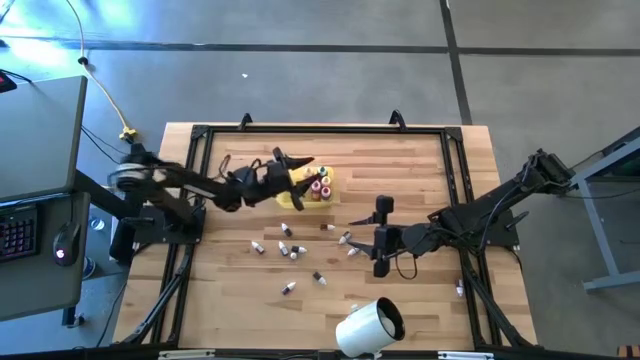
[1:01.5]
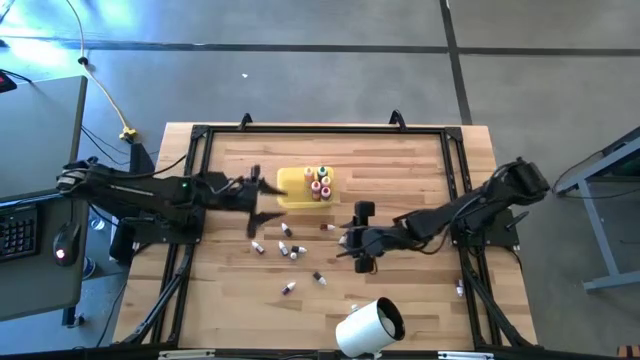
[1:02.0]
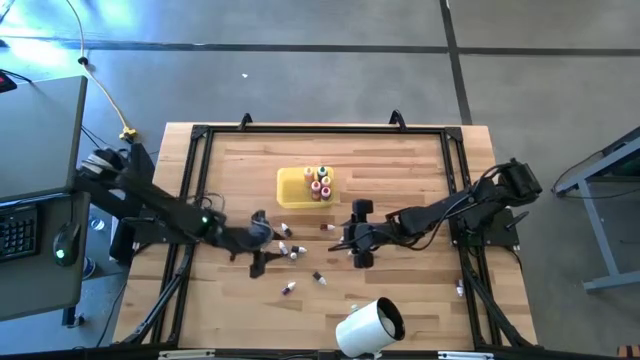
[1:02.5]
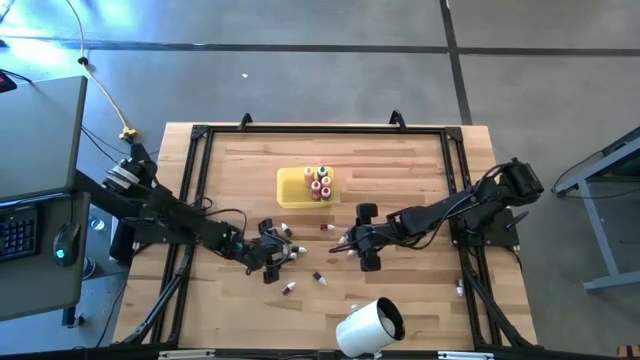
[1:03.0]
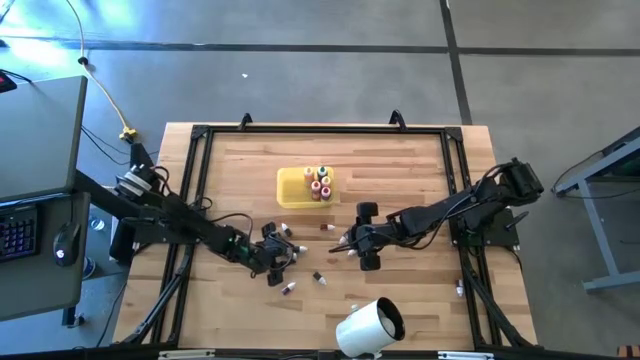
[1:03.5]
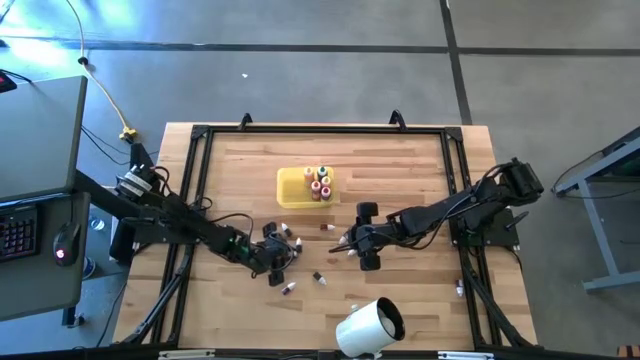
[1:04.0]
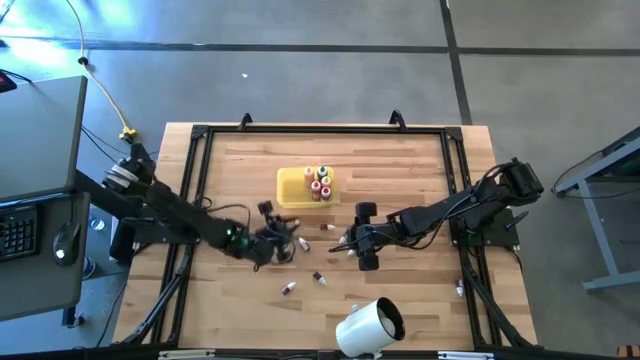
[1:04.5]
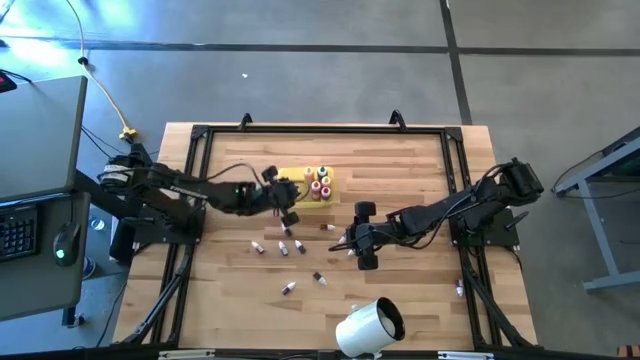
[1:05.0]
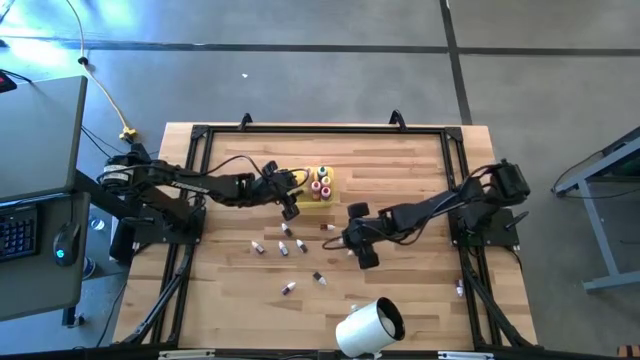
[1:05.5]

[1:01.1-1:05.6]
Task: Pick & Place food coloring
Put the left small black food coloring bottle into the yellow container

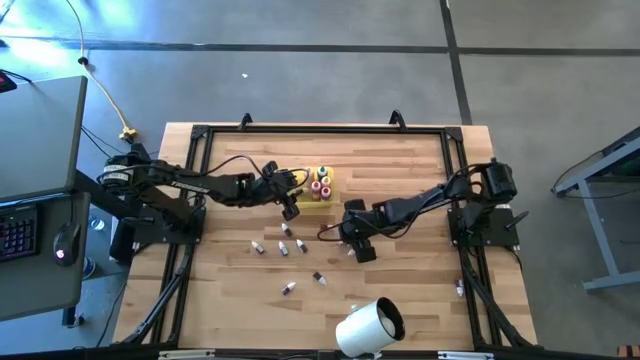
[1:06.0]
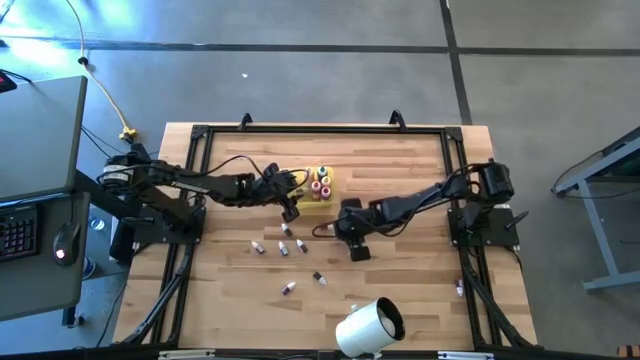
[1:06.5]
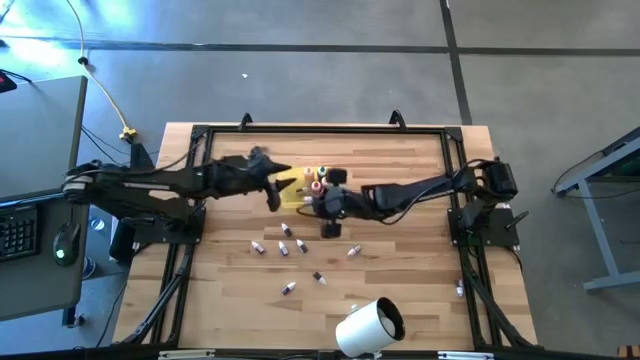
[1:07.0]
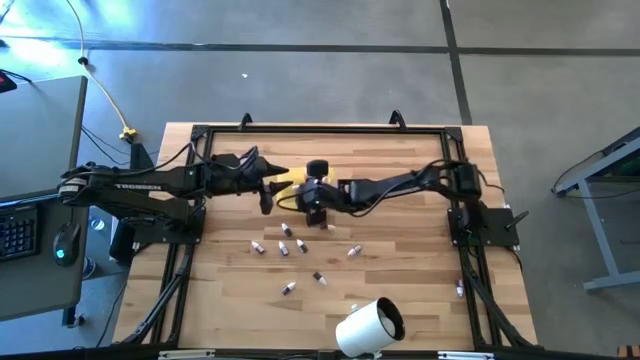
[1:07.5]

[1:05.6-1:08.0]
Put the small black food coloring bottle into the yellow container

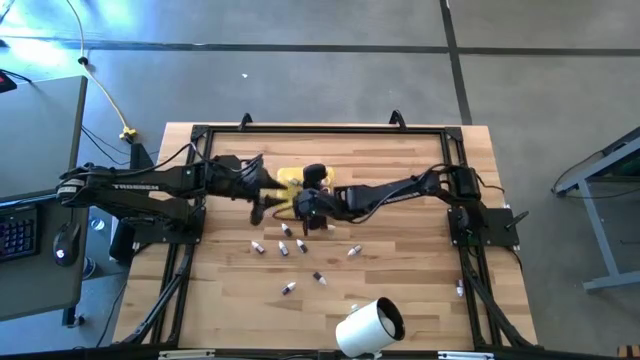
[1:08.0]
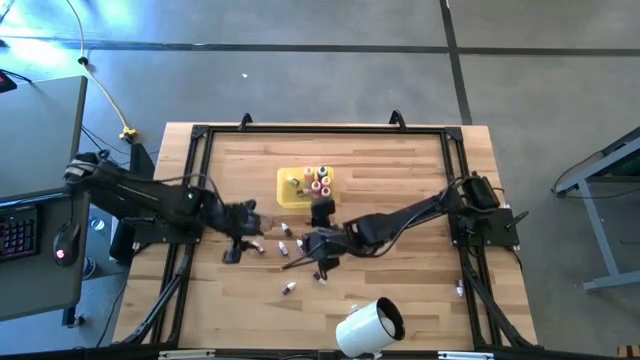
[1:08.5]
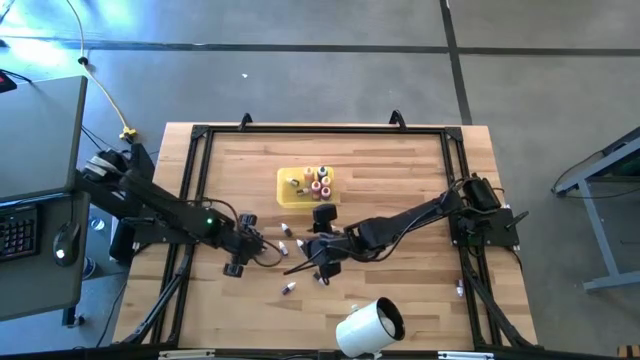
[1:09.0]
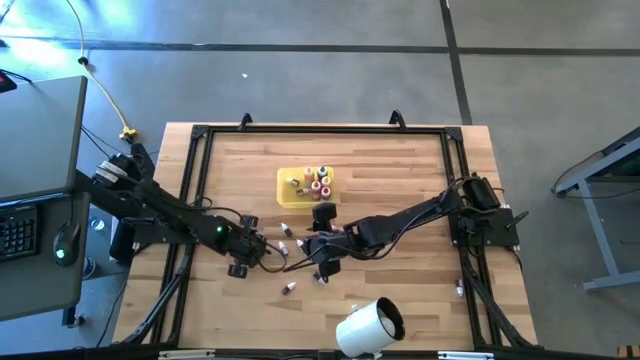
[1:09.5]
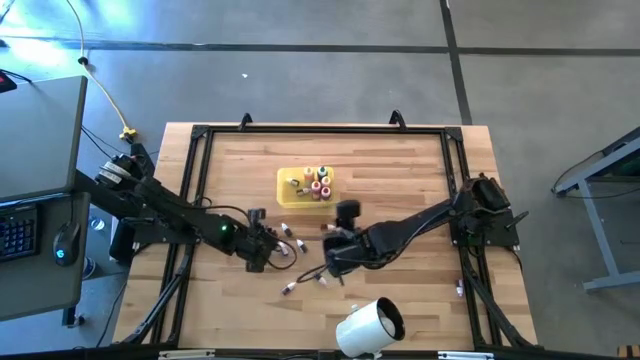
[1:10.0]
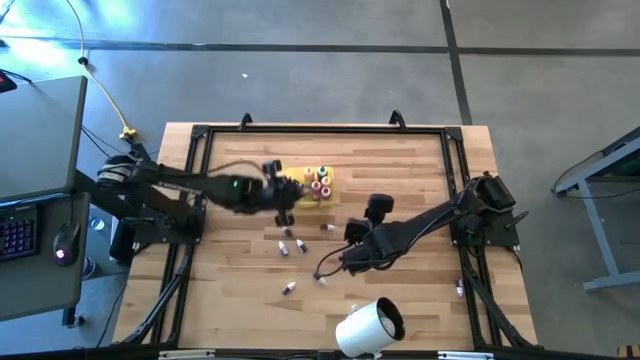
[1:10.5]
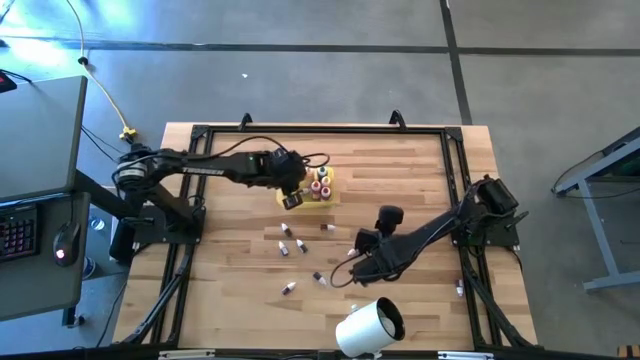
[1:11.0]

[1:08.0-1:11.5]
Put the middle small red food coloring bottle into the yellow container

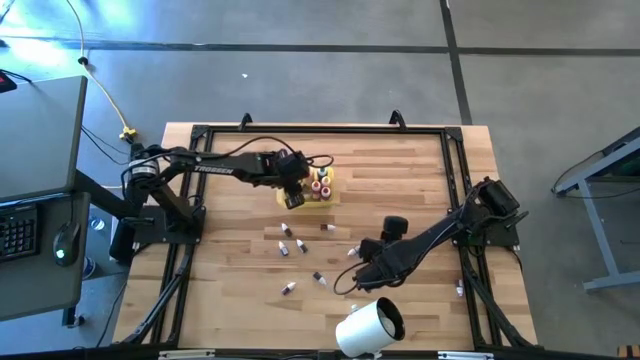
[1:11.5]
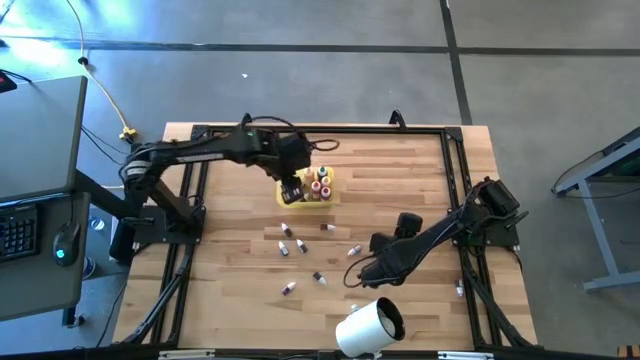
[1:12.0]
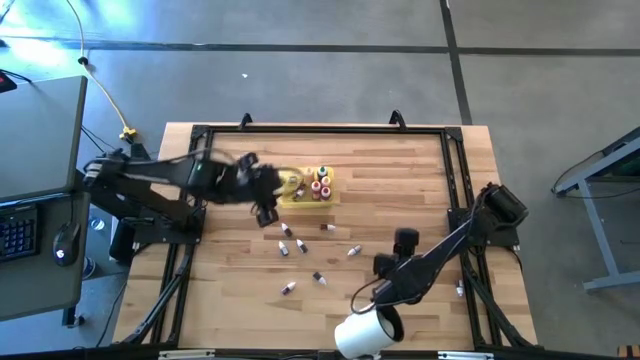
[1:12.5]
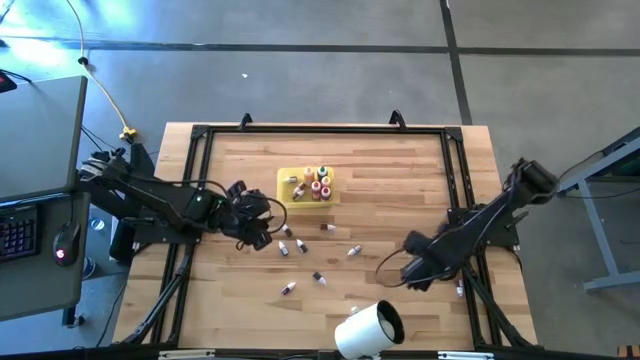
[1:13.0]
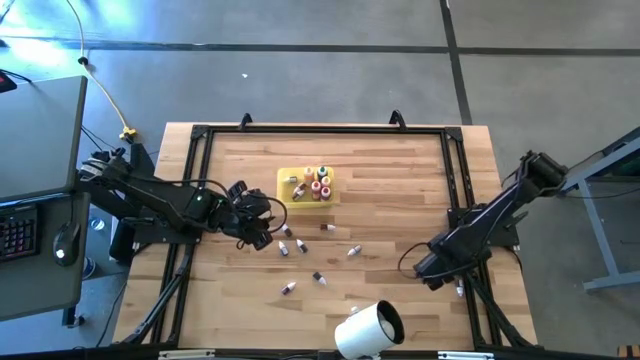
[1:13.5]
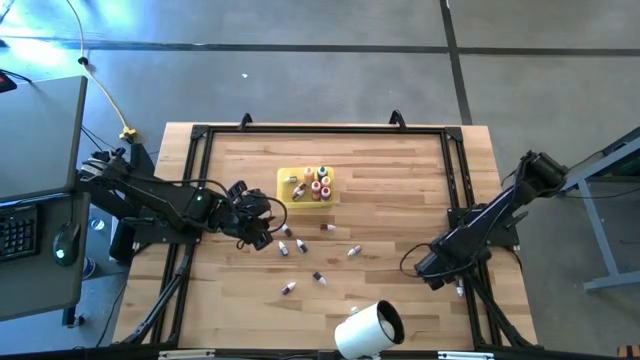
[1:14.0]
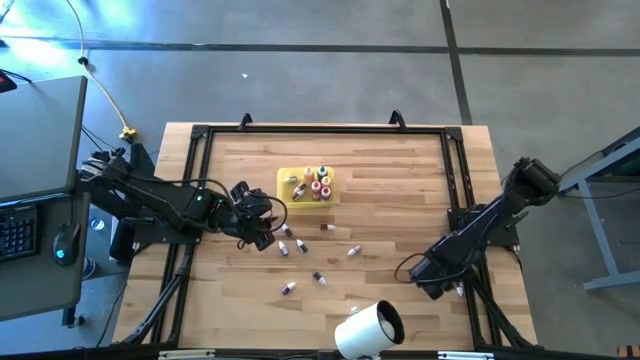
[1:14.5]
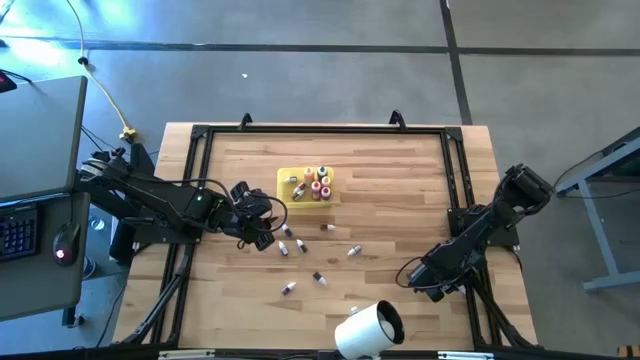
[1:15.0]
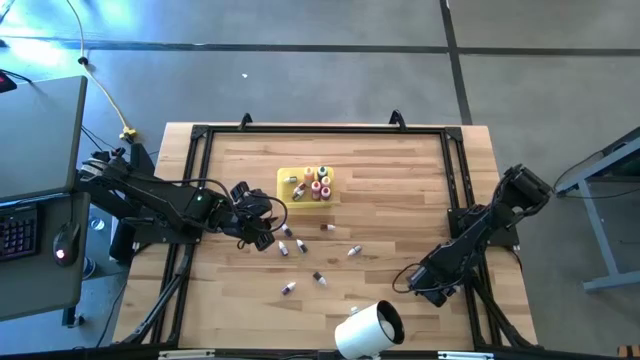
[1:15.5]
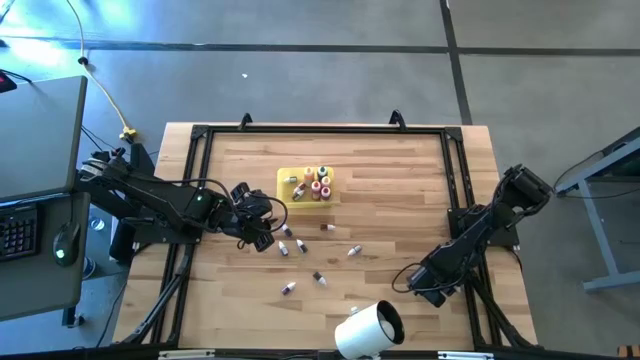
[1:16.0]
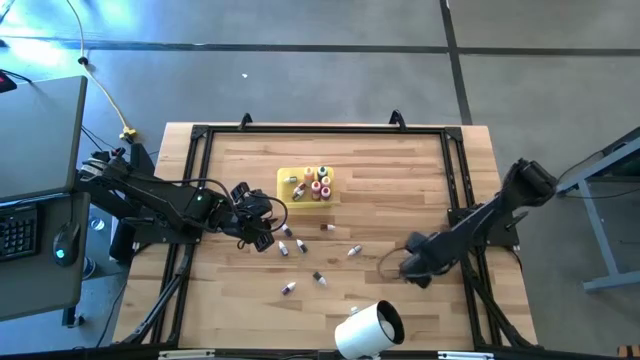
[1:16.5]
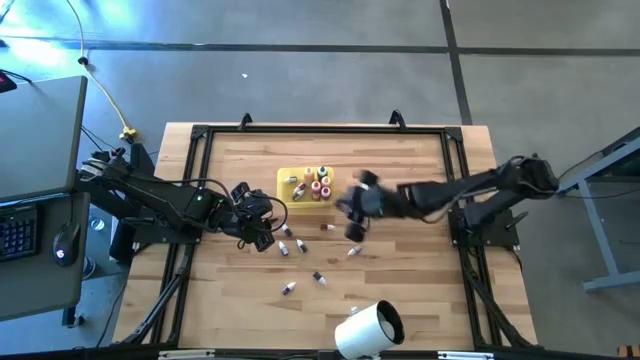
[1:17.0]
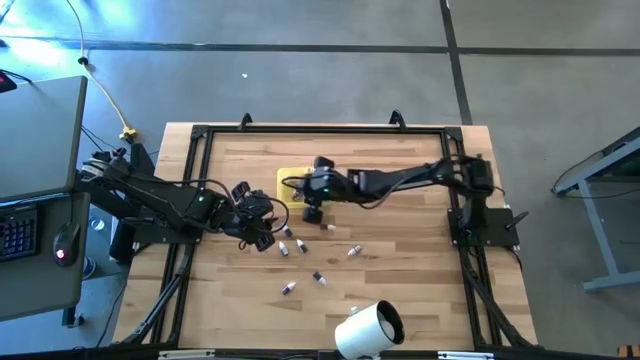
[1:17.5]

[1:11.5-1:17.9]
Put the right small blue food coloring bottle into the yellow container

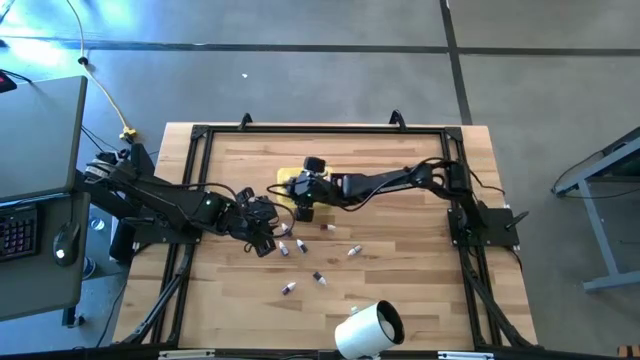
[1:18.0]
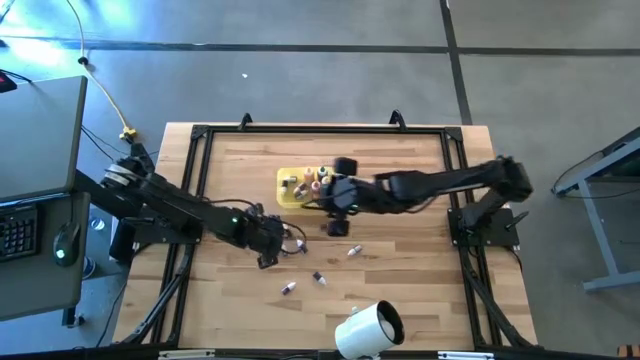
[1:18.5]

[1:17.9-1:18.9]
Put the small dark blue food coloring bottle into the yellow container

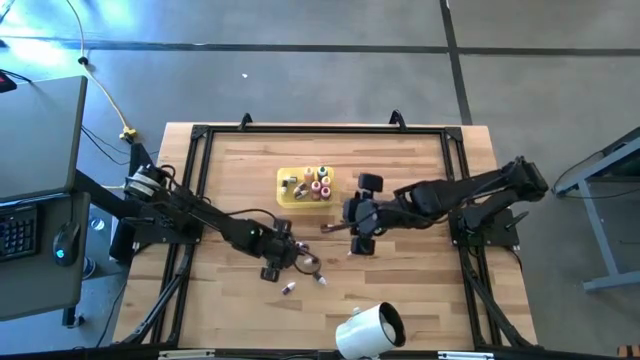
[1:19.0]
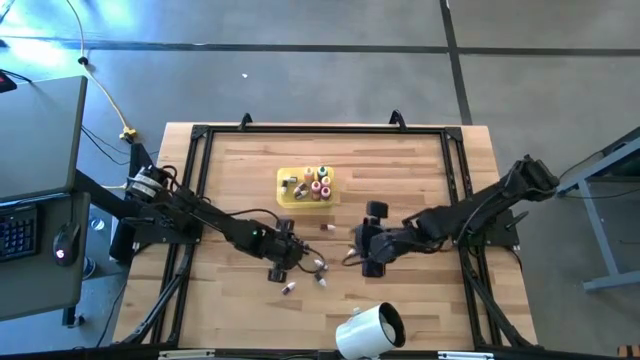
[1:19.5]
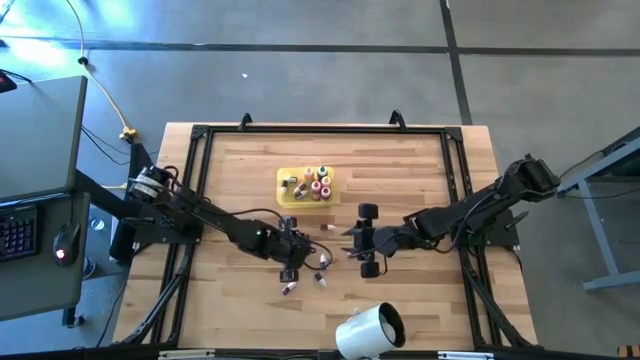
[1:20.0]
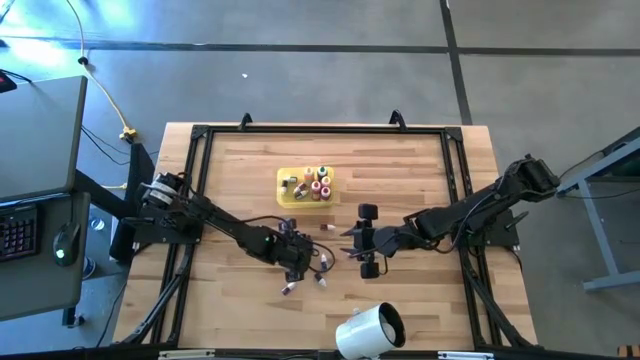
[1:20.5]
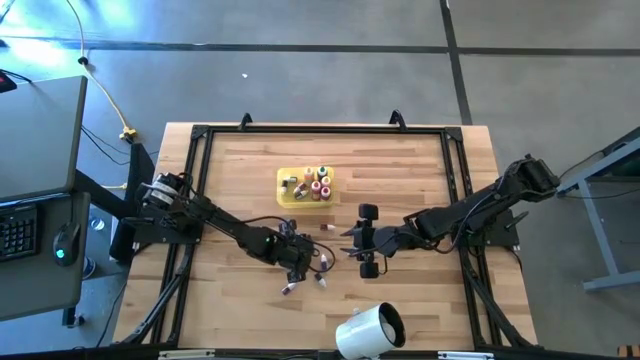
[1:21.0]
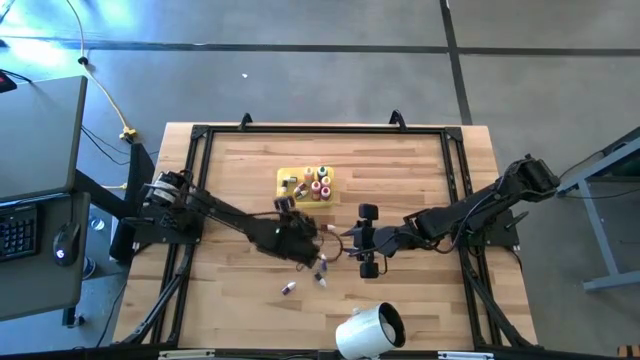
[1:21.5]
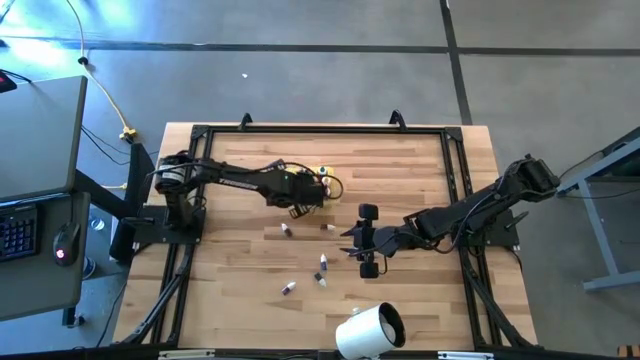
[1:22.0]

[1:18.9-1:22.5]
Put the middle small green food coloring bottle into the yellow container
